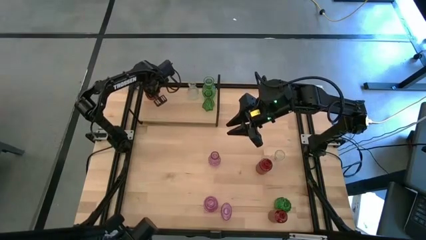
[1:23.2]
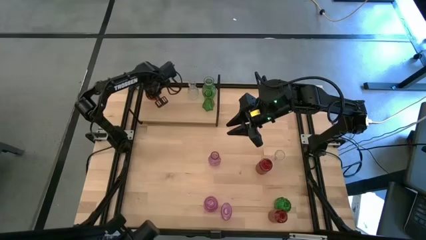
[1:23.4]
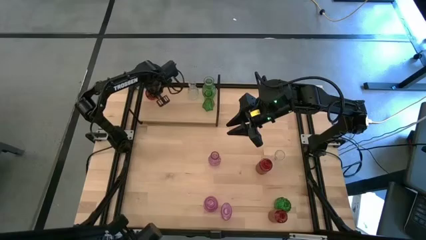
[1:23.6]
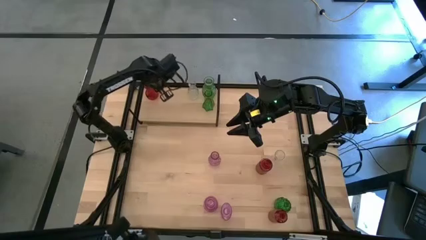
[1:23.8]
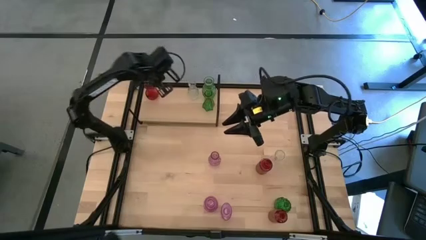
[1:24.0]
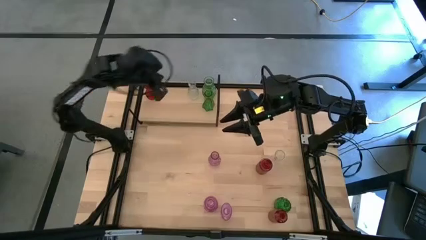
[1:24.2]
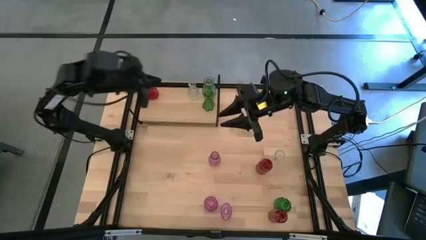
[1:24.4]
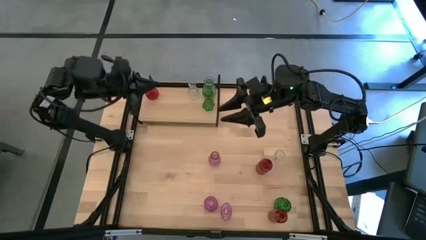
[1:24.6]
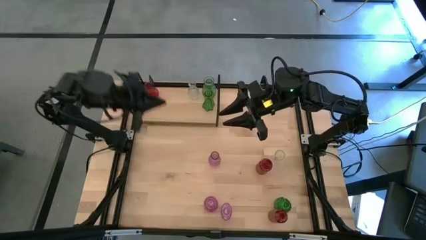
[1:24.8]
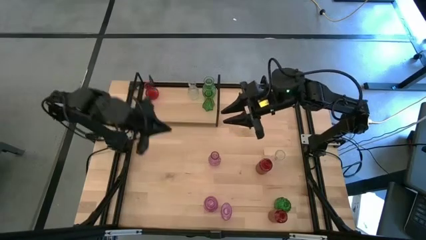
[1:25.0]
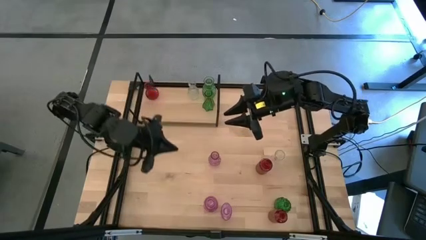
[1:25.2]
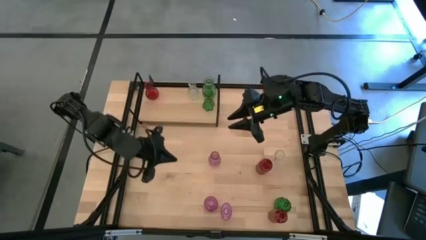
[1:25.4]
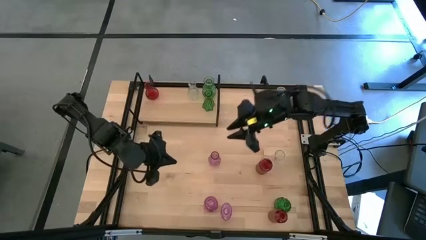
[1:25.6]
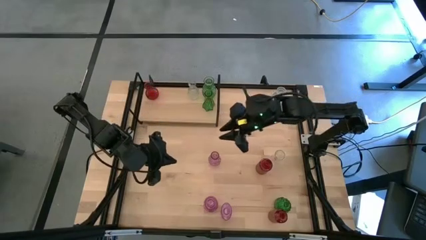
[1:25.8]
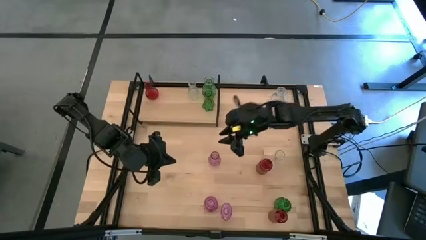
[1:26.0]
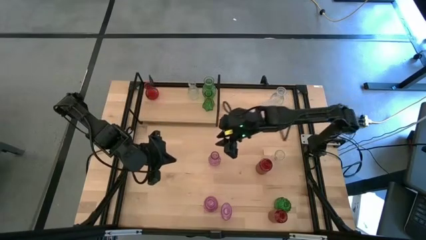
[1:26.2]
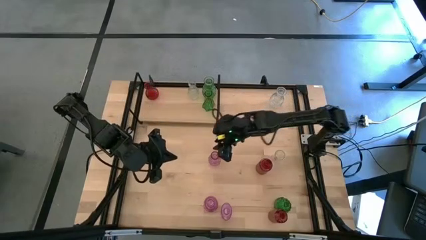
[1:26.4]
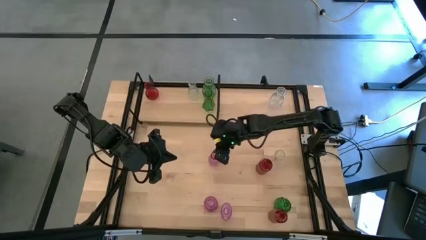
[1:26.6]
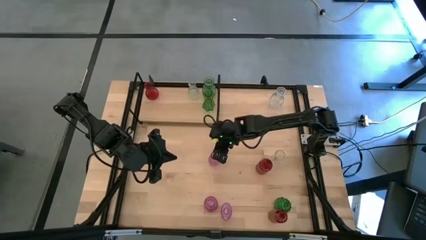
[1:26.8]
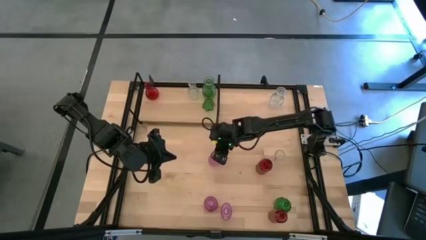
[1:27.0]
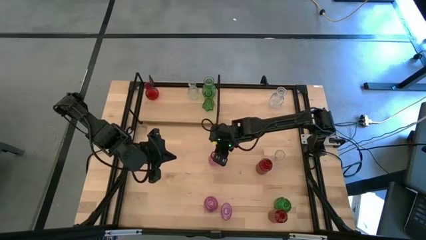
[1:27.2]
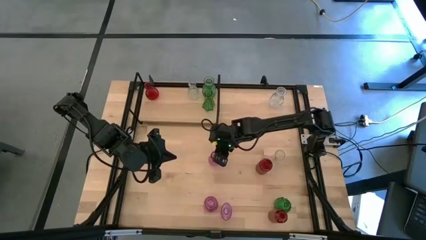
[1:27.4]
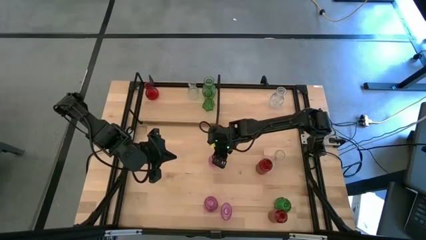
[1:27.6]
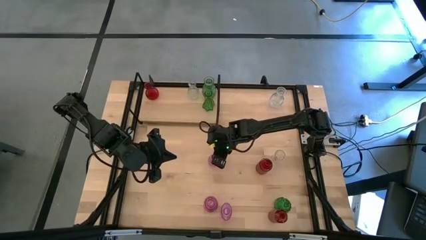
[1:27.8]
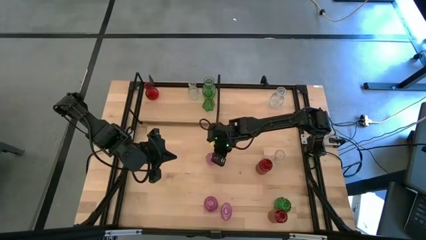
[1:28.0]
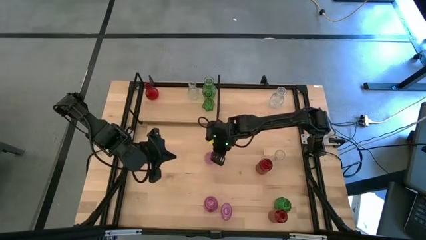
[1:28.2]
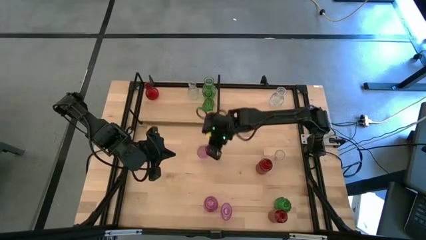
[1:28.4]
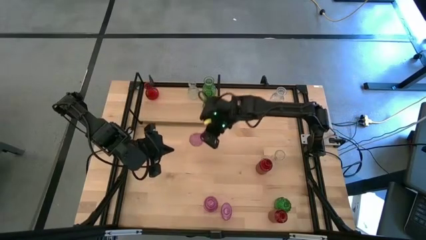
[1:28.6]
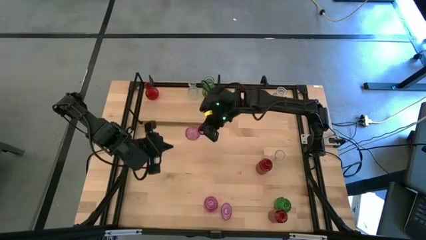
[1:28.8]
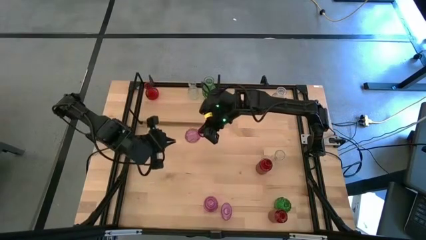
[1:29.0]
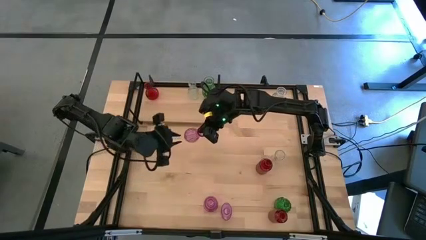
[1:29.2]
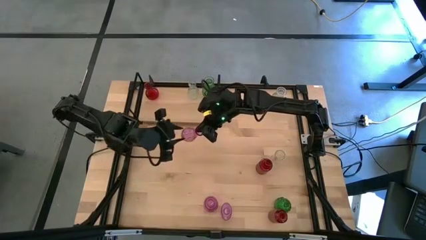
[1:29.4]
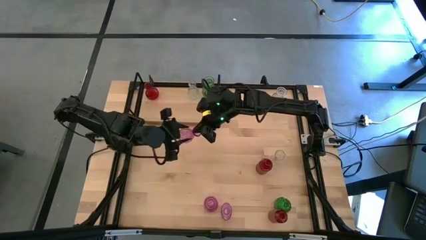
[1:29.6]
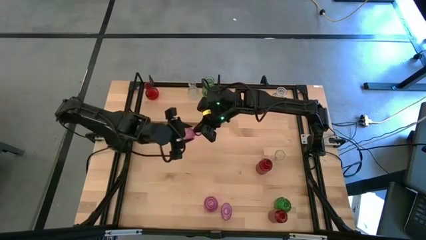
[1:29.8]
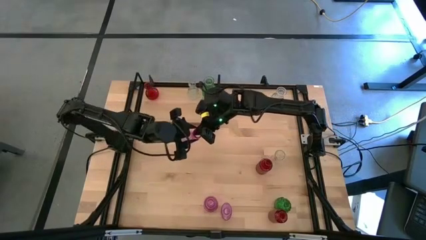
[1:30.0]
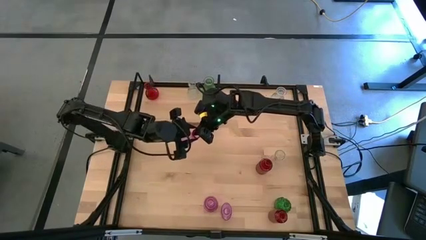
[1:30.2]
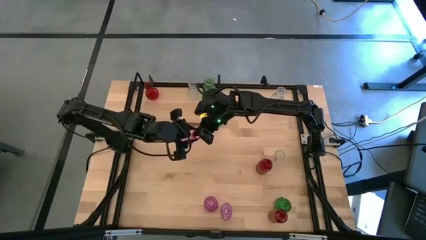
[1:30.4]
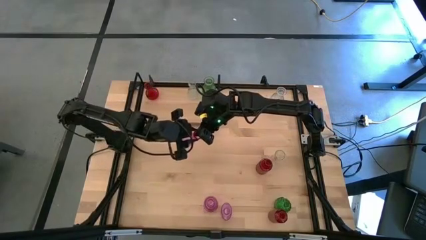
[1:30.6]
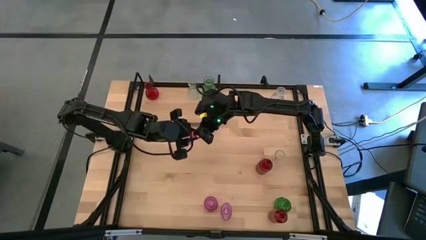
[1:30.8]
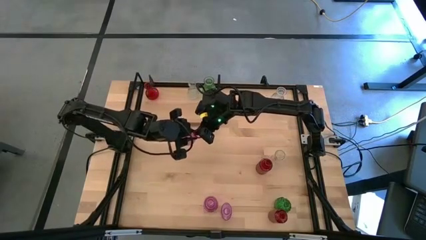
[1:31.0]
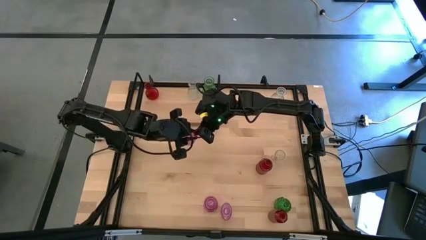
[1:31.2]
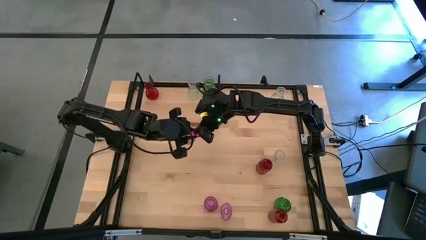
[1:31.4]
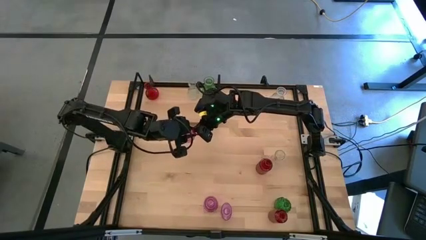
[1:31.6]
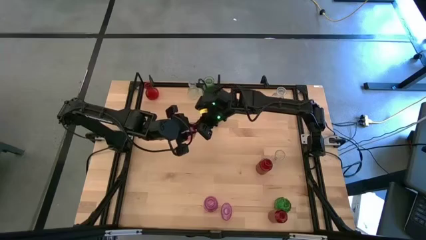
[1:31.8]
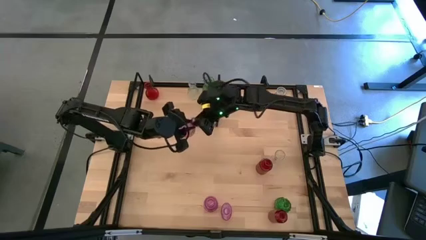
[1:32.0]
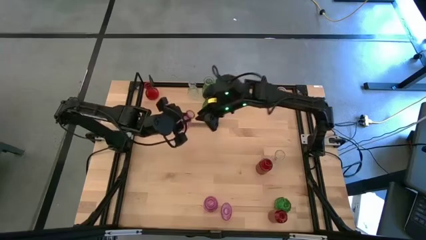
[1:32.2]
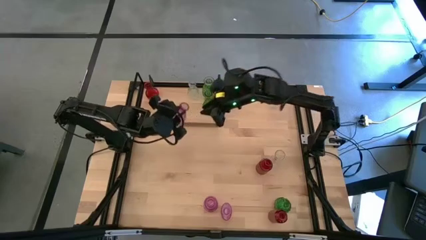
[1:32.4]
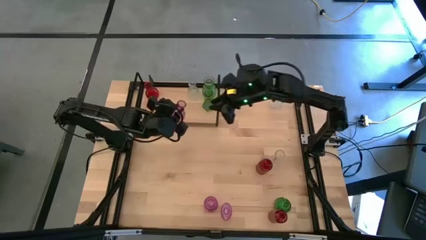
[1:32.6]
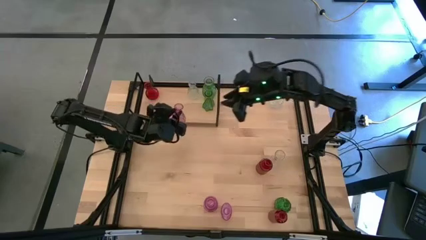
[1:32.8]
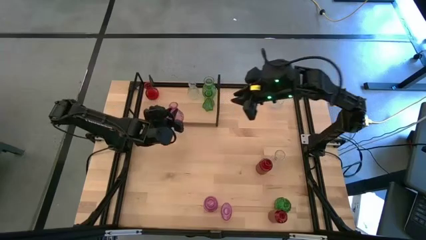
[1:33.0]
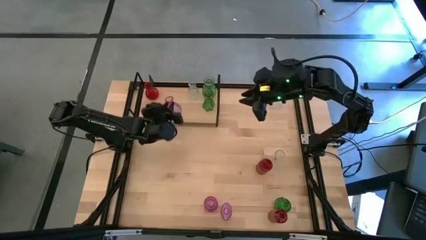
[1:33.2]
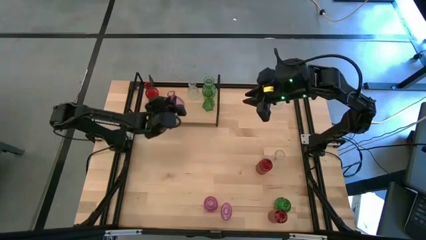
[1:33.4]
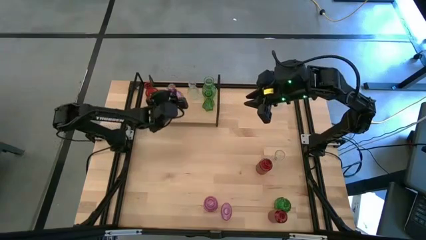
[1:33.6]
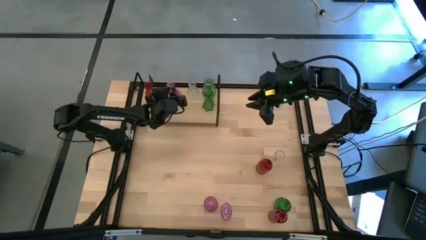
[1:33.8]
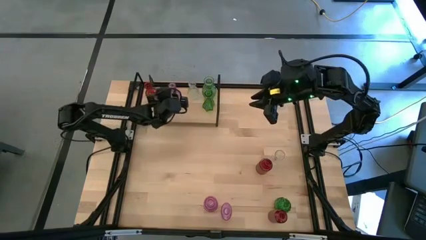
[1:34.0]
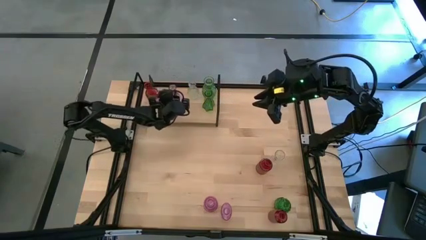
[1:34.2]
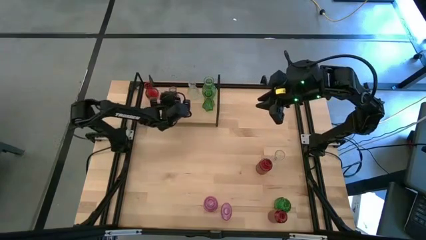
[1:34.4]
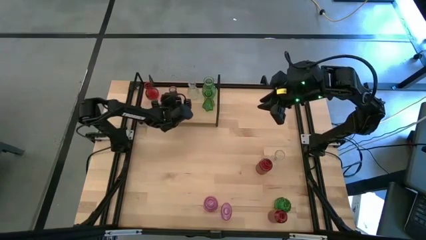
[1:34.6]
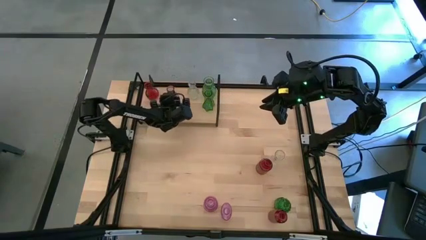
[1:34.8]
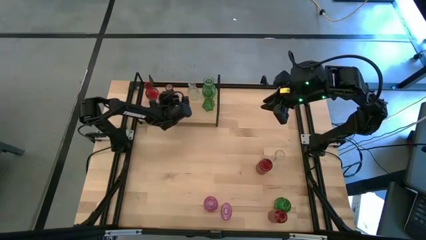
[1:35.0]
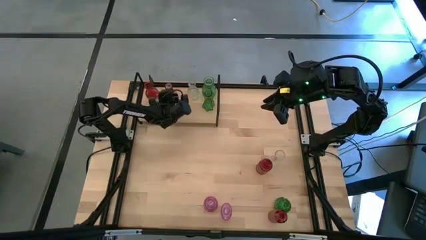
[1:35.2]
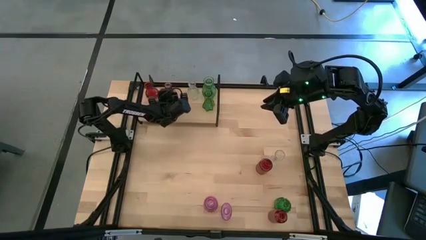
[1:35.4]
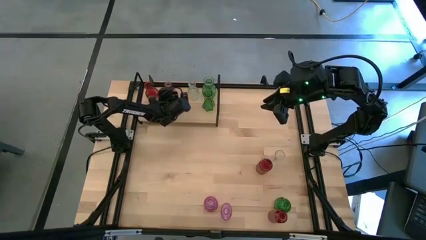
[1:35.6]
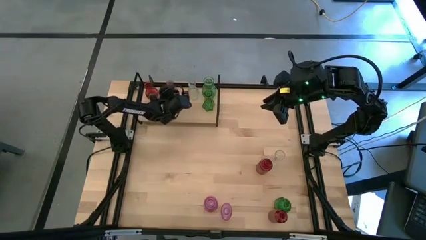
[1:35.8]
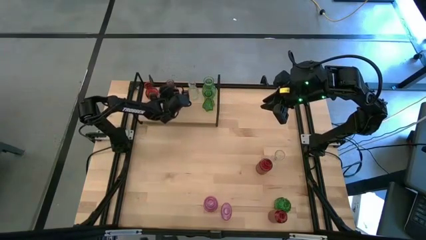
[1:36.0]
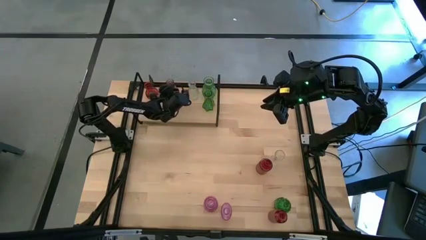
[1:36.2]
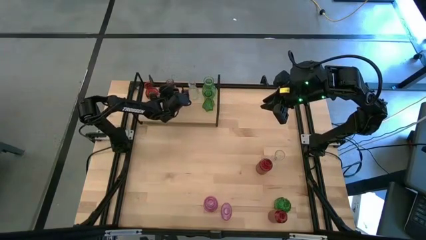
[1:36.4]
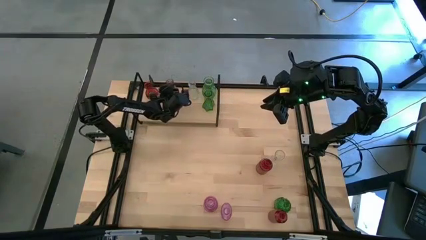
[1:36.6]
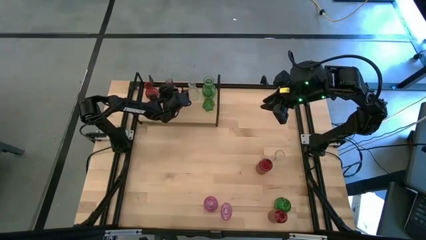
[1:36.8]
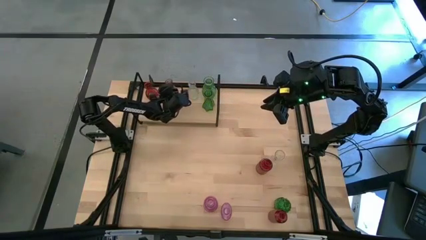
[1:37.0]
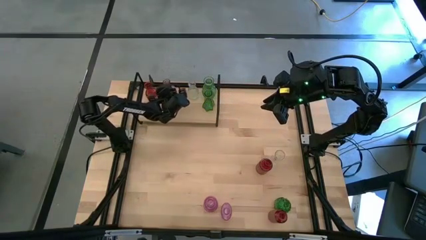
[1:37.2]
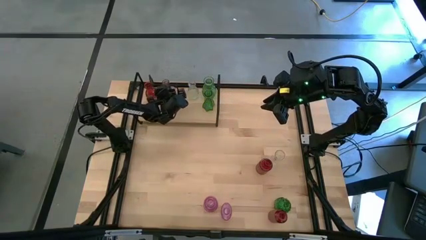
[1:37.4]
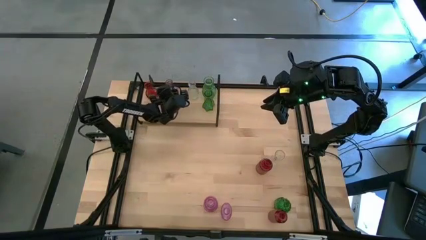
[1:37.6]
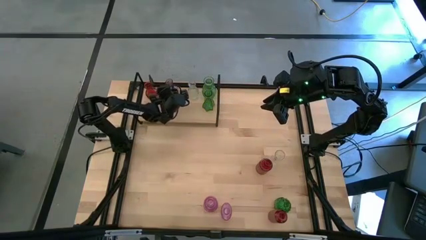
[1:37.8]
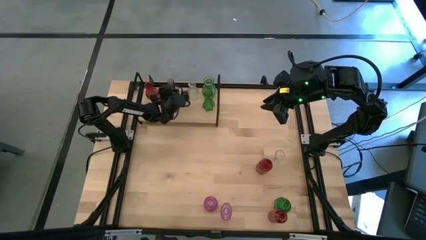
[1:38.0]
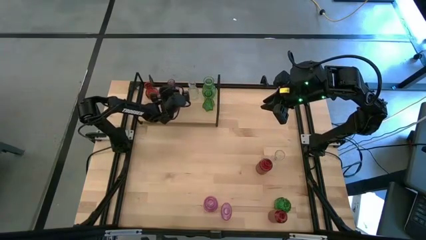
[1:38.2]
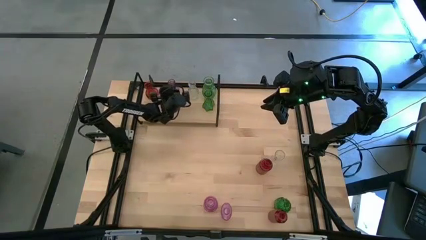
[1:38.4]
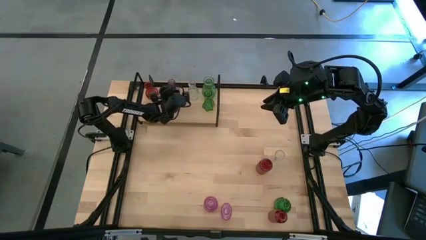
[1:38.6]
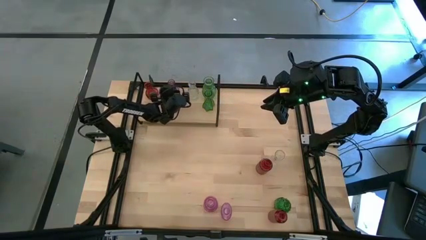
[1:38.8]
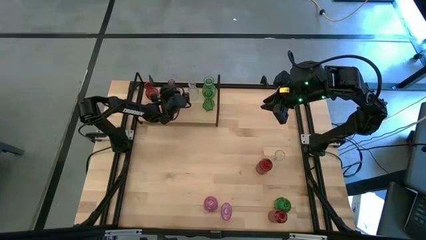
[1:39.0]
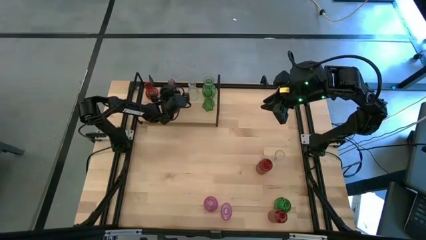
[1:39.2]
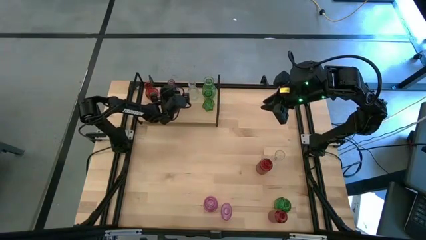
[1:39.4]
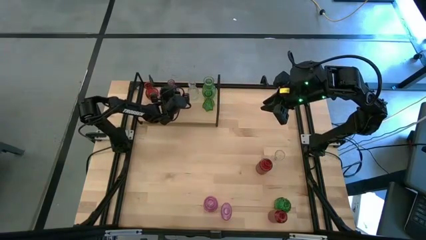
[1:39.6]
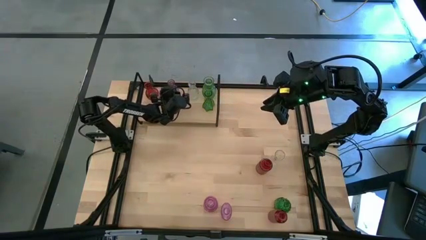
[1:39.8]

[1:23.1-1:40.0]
Task: sort vases onto shelf
Put the top purple vase on the shelf
